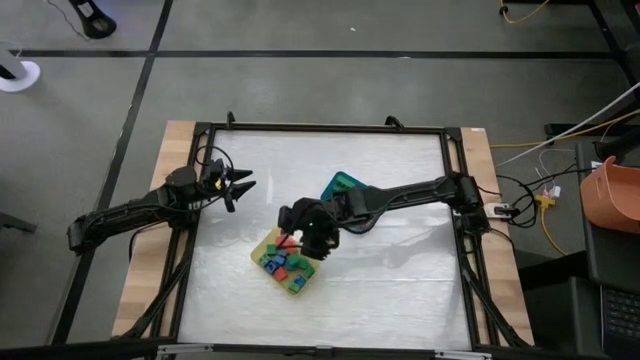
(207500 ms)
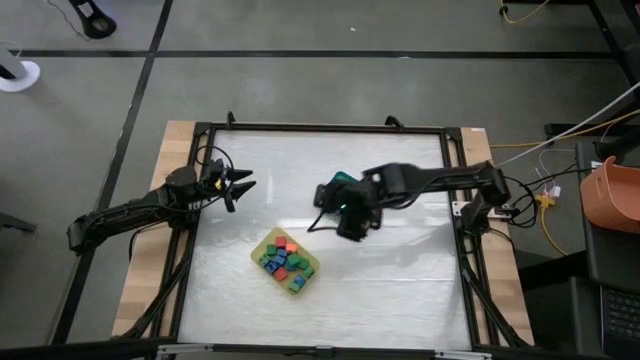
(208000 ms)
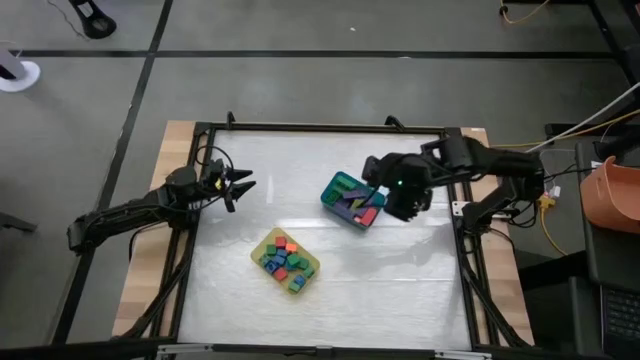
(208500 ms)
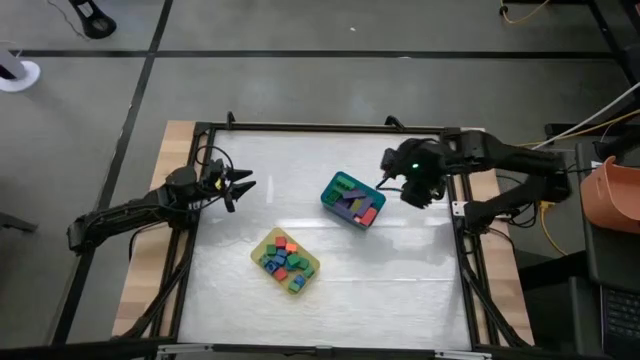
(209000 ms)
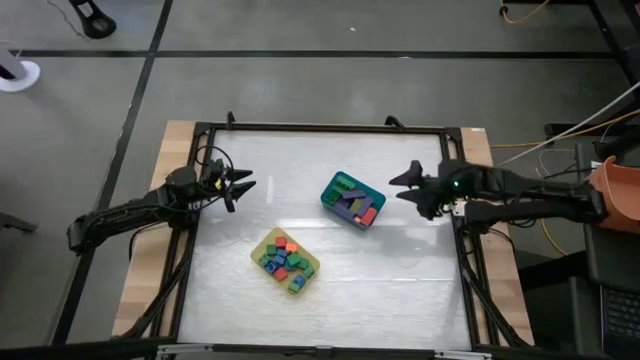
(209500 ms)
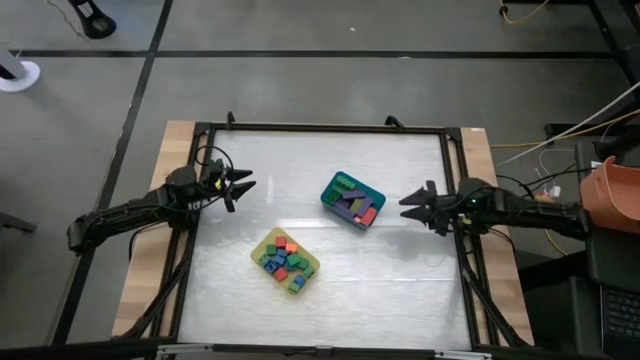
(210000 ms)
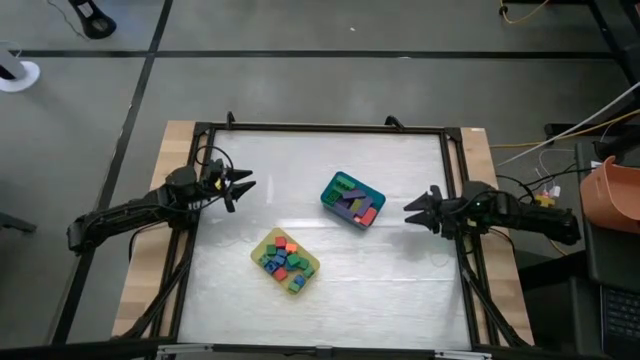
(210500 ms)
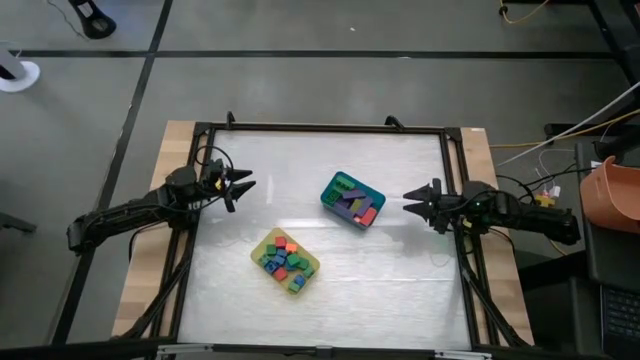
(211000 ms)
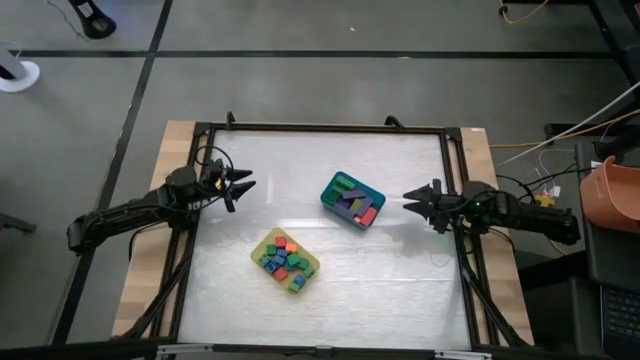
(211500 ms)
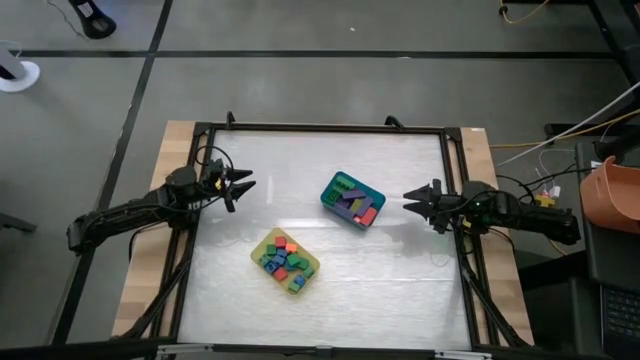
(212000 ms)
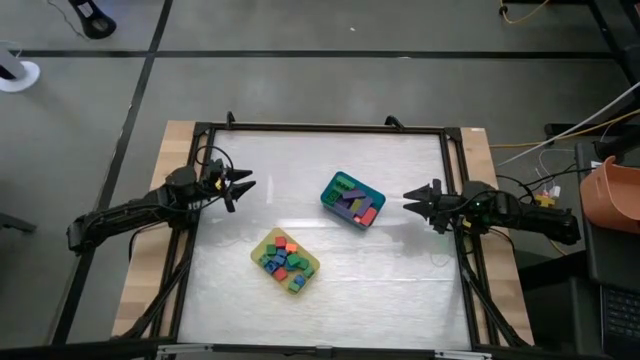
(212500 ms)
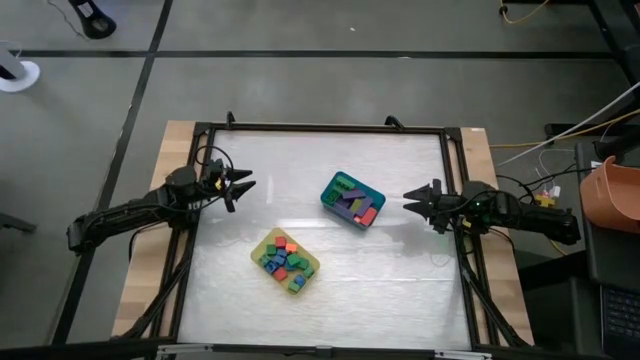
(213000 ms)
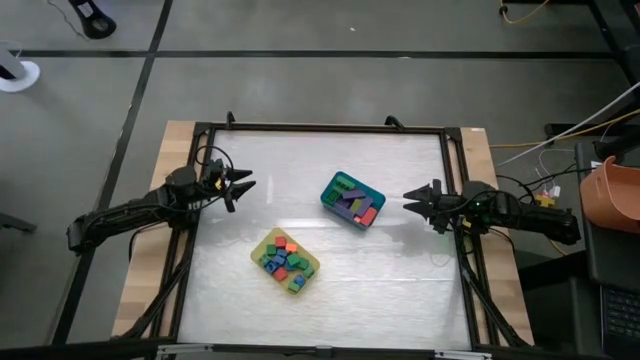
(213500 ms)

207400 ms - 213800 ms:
Task: Sort blocks by size
Return to Home Position

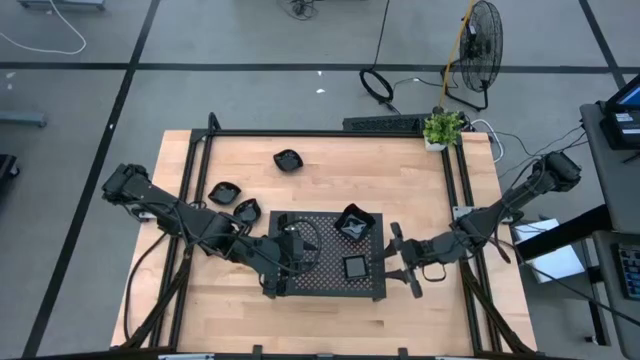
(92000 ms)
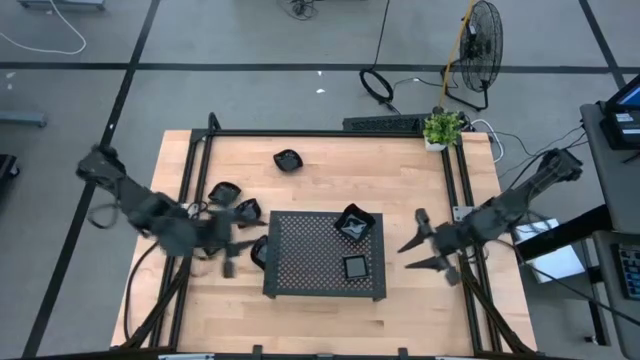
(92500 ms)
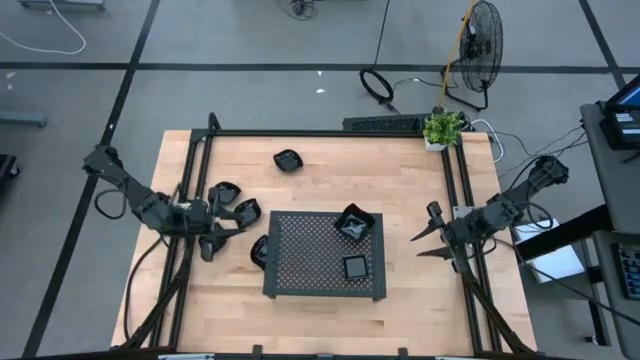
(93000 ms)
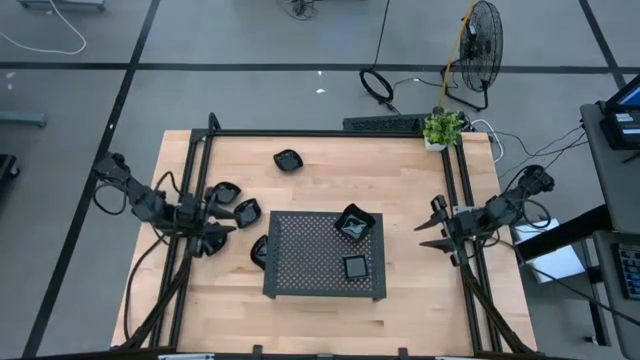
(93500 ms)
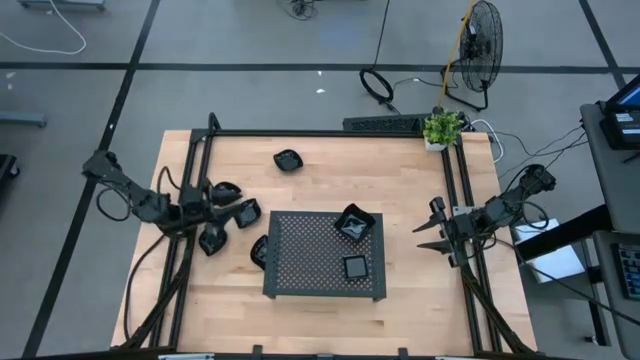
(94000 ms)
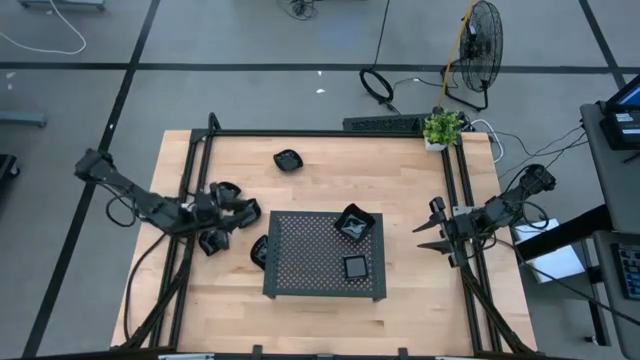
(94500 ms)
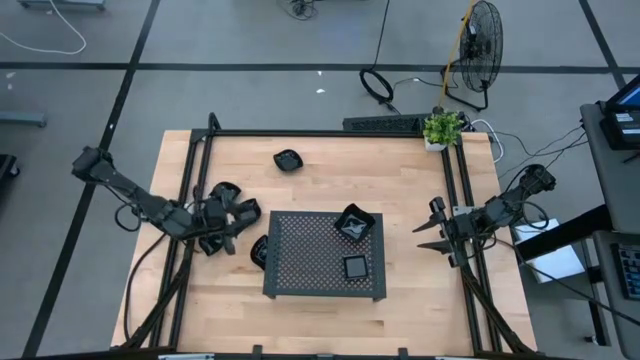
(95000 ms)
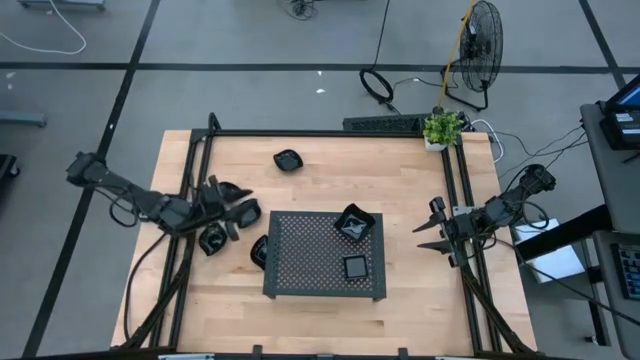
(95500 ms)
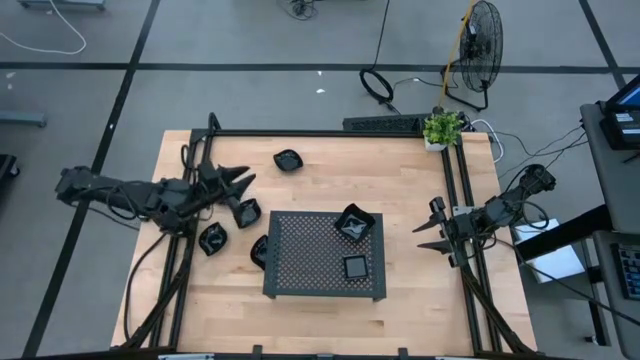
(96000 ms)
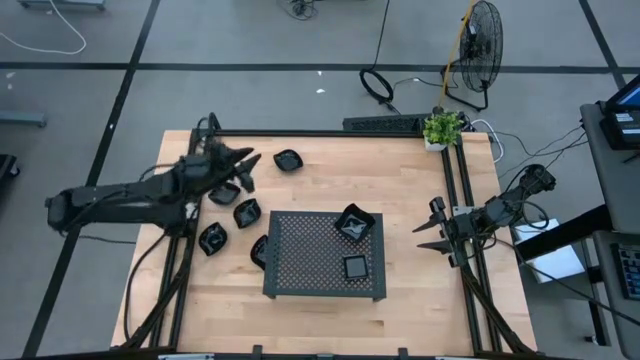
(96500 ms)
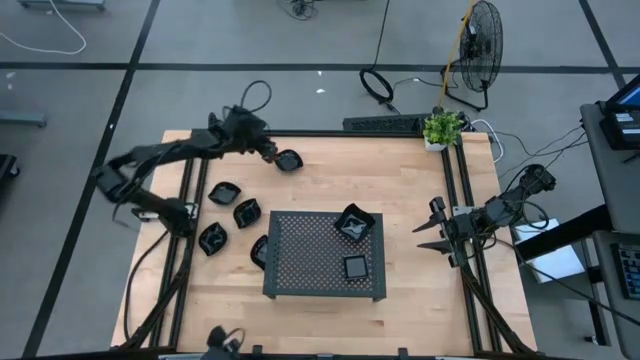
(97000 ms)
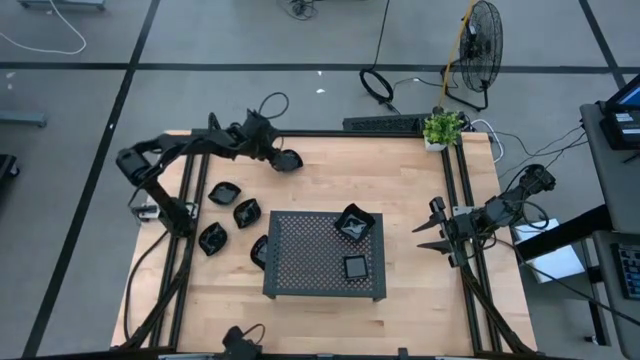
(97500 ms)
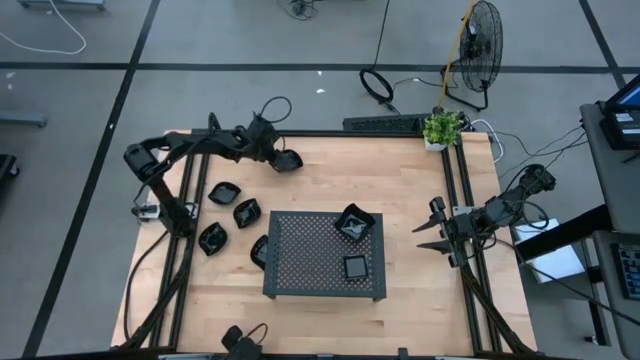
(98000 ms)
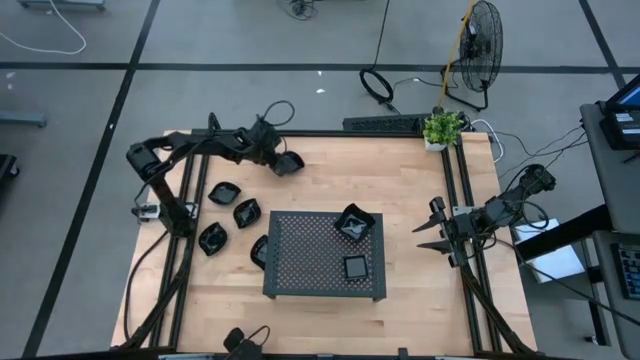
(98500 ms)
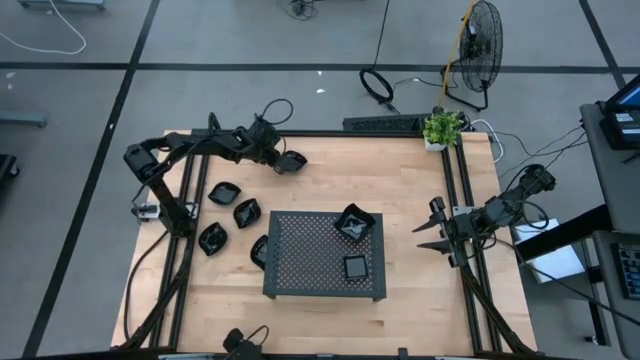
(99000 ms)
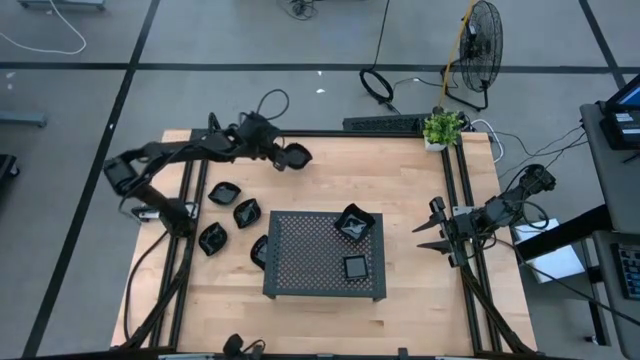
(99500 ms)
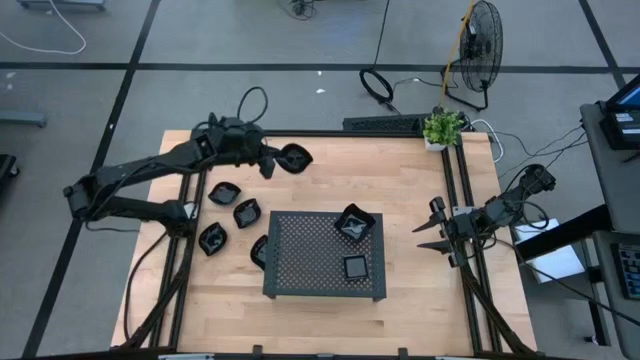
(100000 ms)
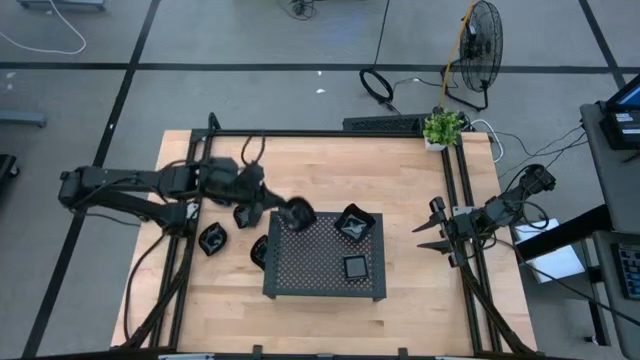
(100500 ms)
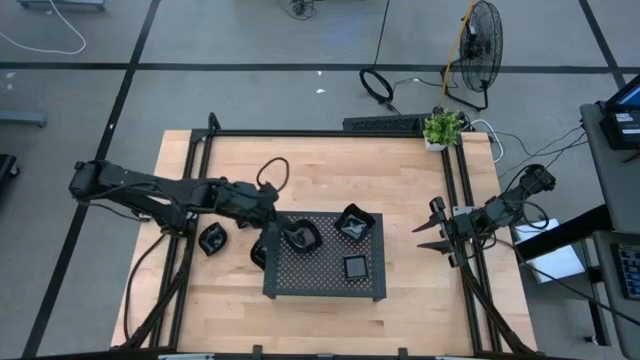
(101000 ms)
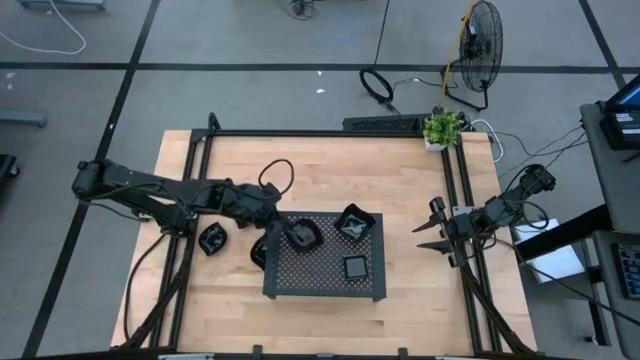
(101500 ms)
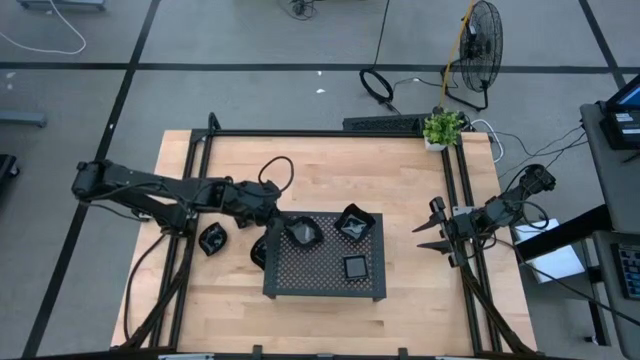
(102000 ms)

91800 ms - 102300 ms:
Task: Pick & Place Mini shaped plates
Put the black leaf-shaped plate on the shelf

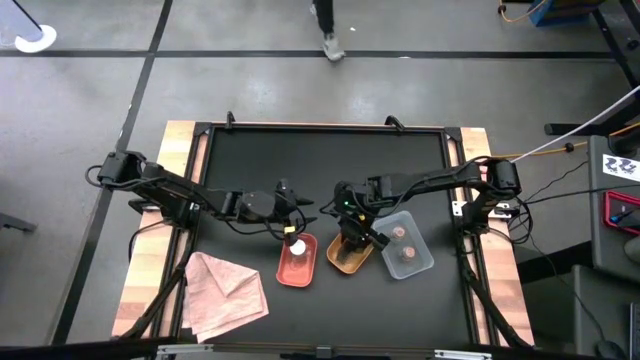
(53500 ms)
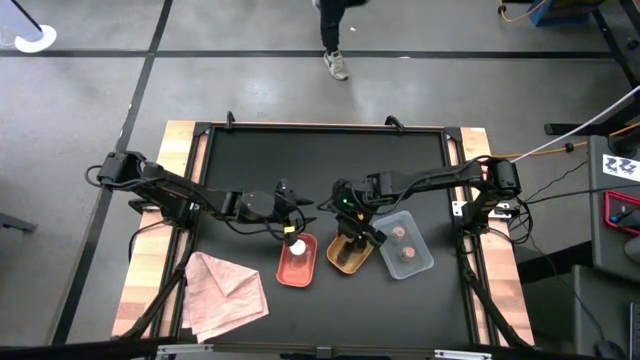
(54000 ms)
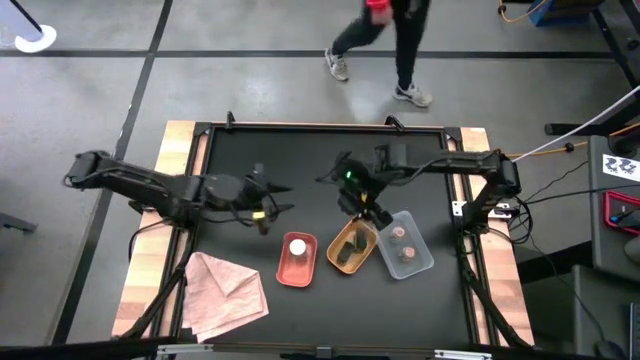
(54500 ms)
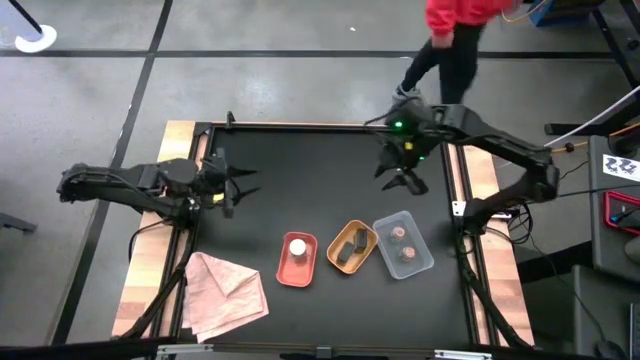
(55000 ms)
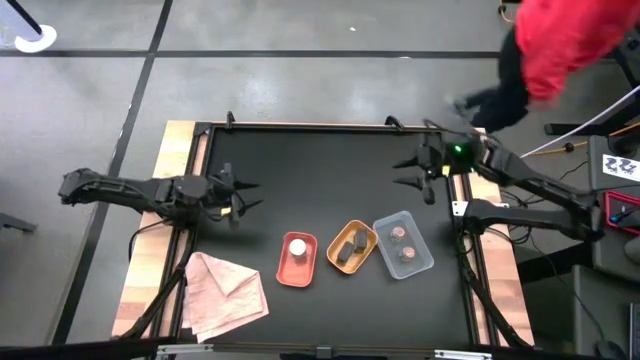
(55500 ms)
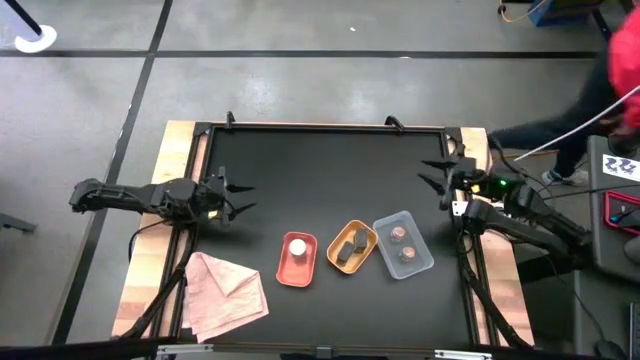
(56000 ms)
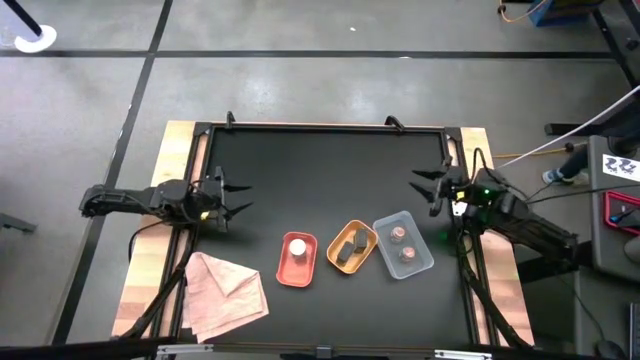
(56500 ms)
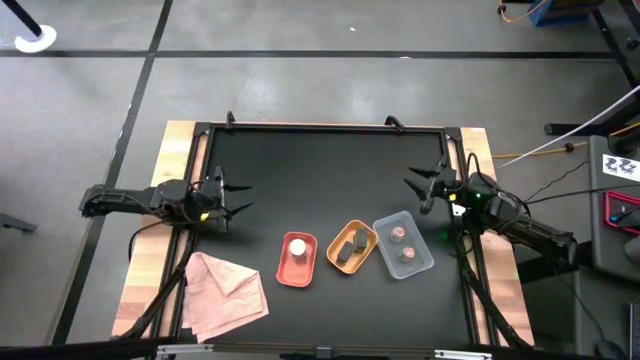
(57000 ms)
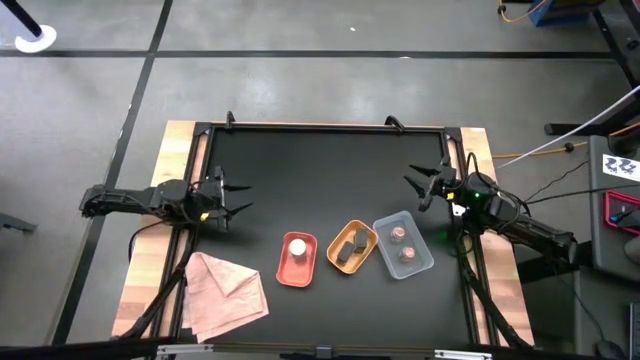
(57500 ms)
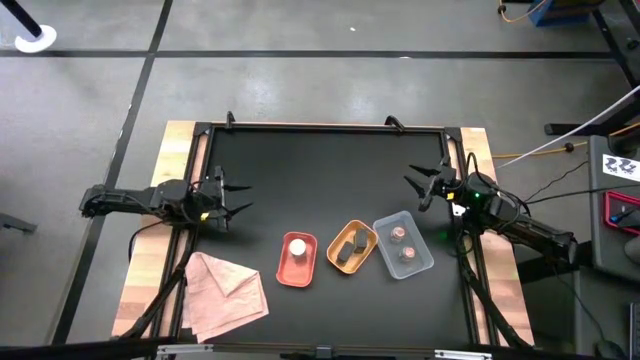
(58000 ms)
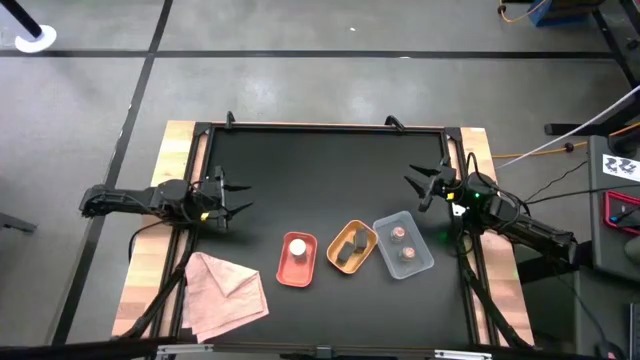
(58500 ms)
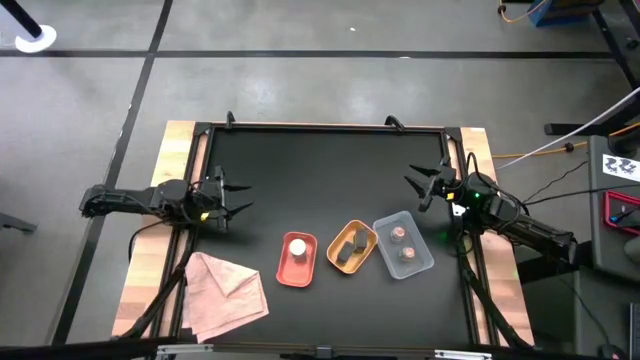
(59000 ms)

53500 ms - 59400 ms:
Task: Sort spices by type
Return to Home Position
